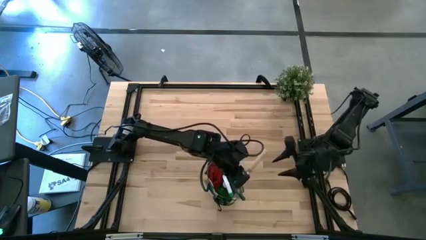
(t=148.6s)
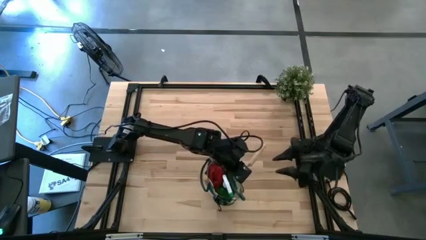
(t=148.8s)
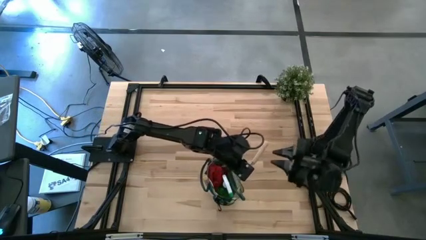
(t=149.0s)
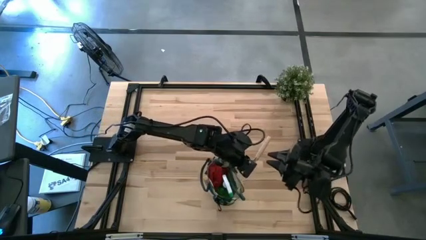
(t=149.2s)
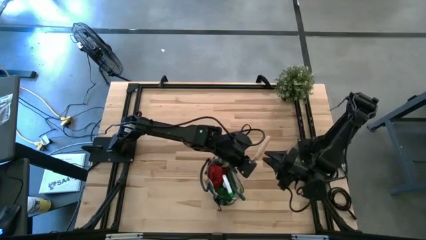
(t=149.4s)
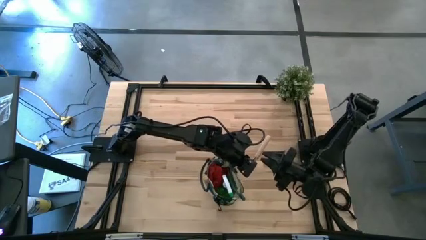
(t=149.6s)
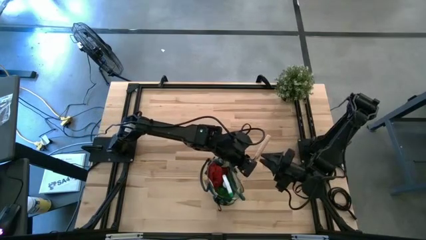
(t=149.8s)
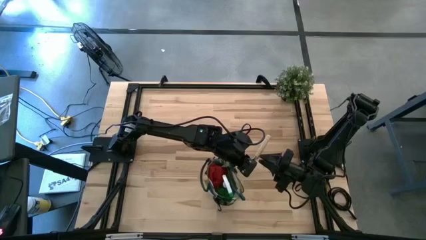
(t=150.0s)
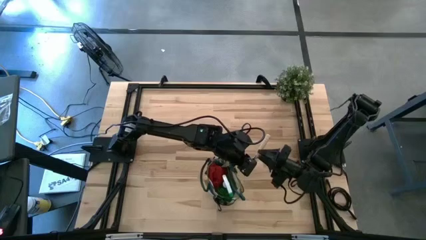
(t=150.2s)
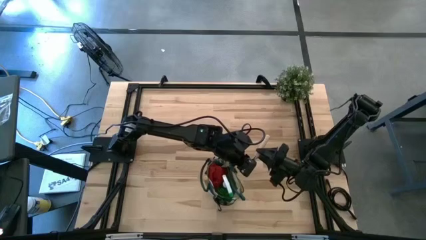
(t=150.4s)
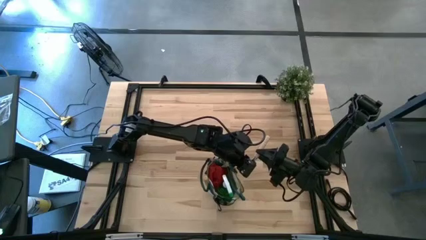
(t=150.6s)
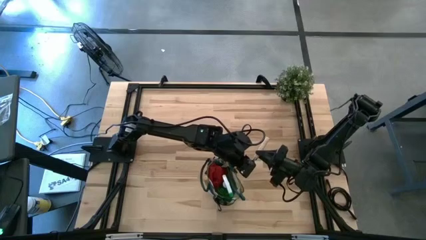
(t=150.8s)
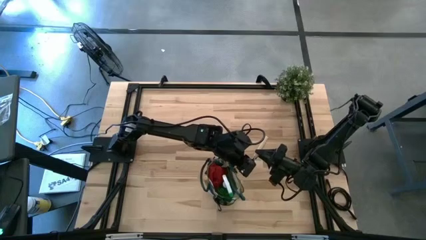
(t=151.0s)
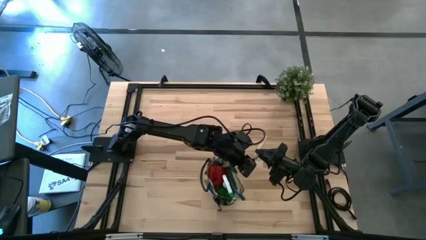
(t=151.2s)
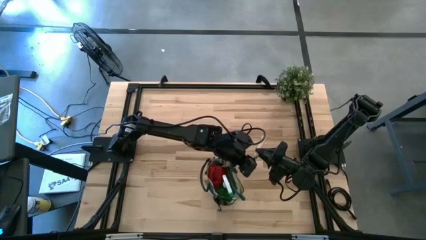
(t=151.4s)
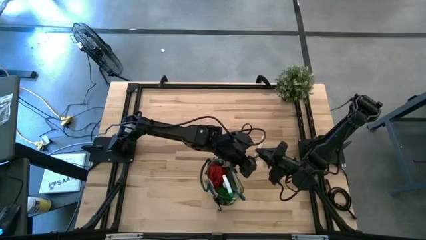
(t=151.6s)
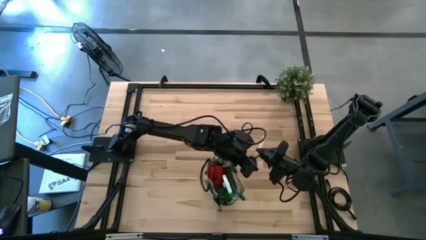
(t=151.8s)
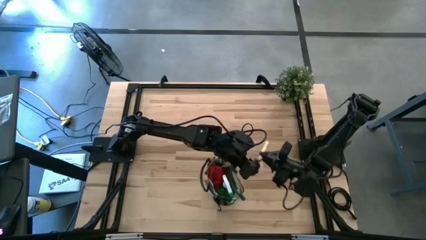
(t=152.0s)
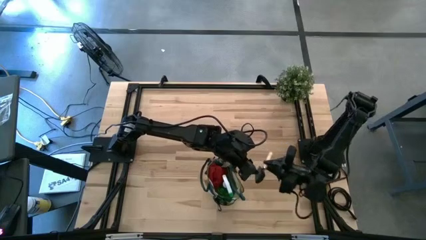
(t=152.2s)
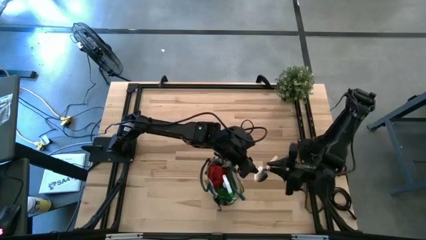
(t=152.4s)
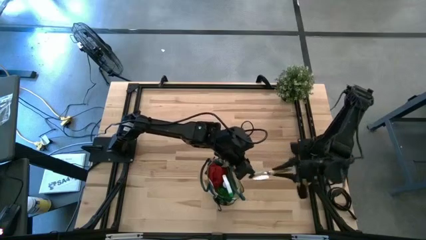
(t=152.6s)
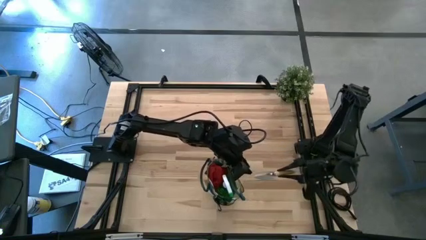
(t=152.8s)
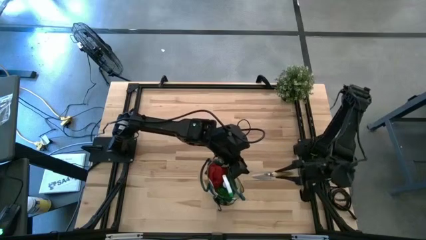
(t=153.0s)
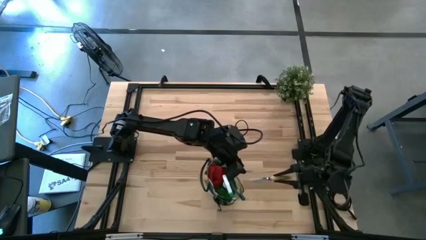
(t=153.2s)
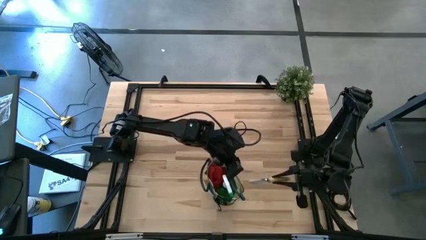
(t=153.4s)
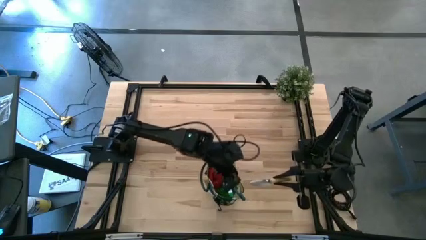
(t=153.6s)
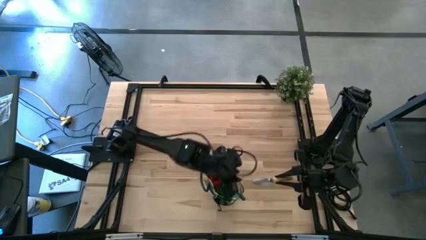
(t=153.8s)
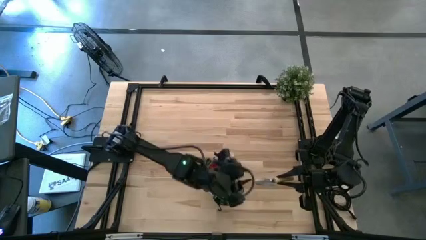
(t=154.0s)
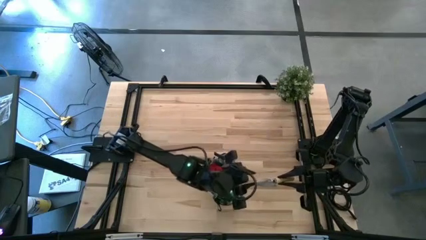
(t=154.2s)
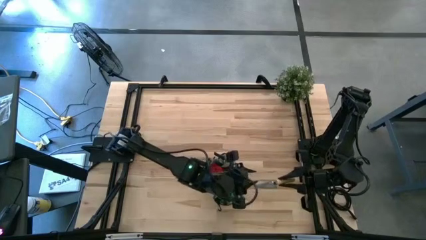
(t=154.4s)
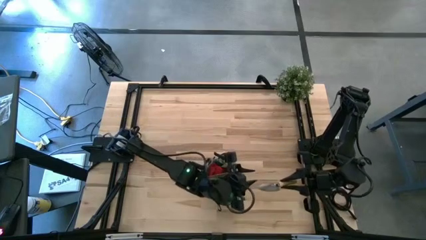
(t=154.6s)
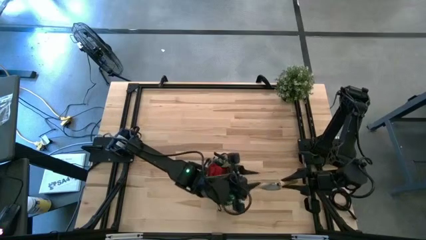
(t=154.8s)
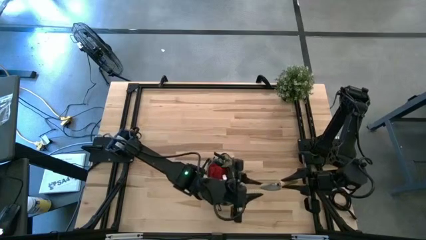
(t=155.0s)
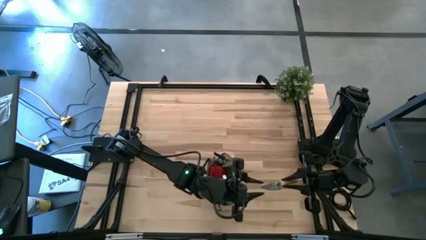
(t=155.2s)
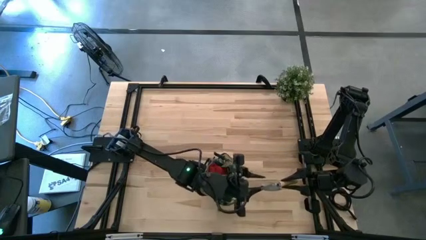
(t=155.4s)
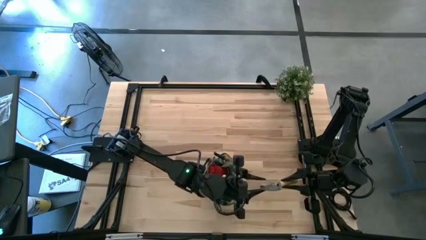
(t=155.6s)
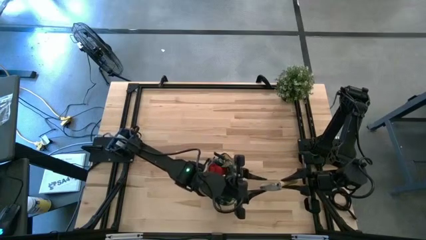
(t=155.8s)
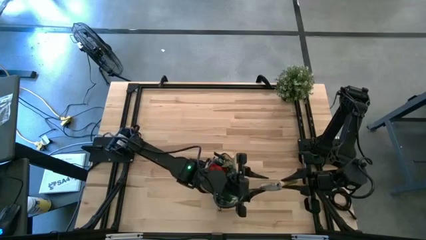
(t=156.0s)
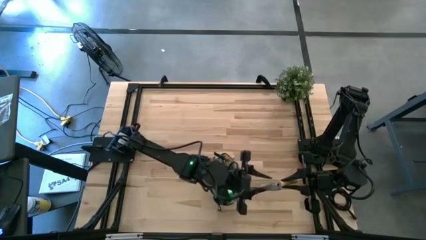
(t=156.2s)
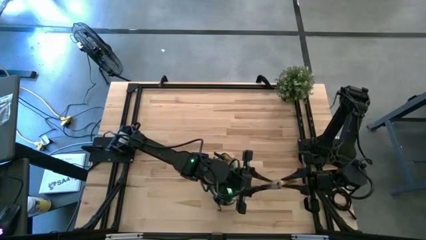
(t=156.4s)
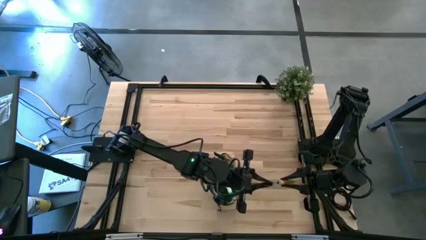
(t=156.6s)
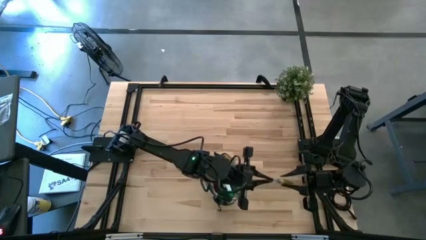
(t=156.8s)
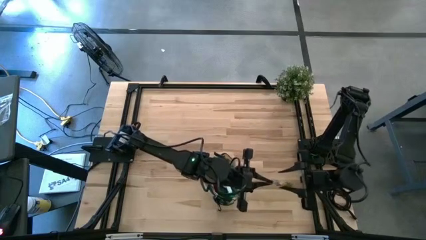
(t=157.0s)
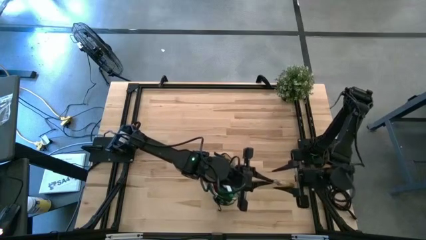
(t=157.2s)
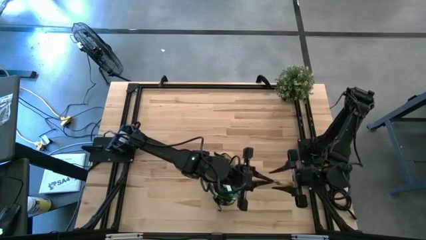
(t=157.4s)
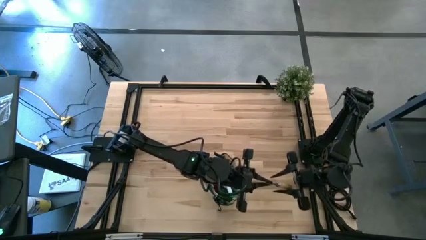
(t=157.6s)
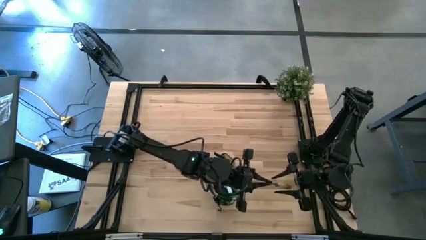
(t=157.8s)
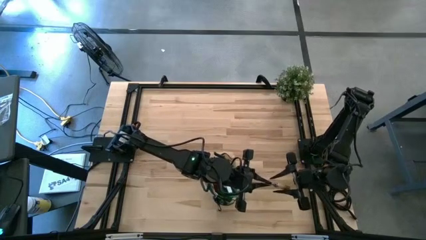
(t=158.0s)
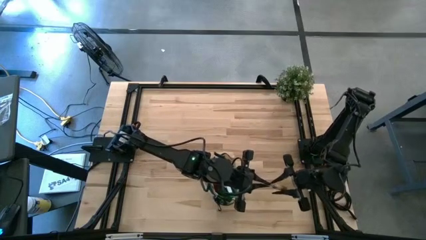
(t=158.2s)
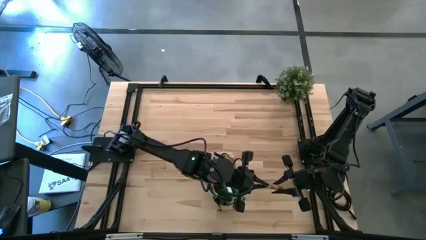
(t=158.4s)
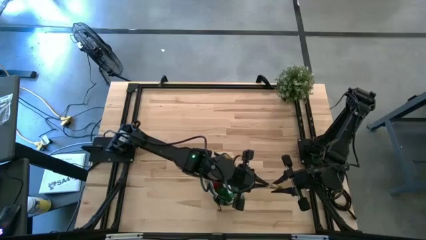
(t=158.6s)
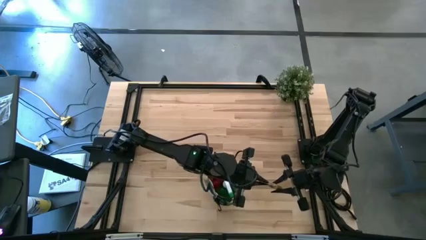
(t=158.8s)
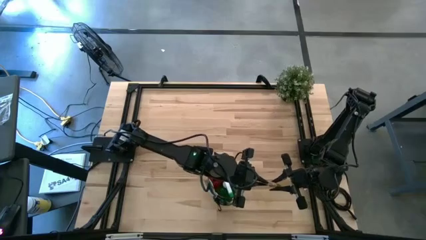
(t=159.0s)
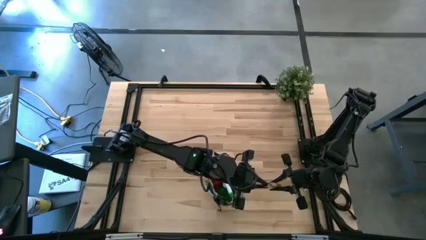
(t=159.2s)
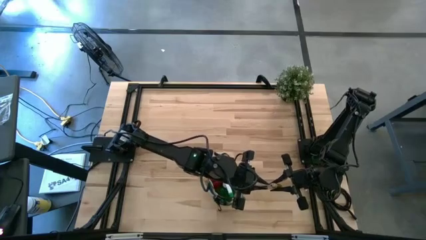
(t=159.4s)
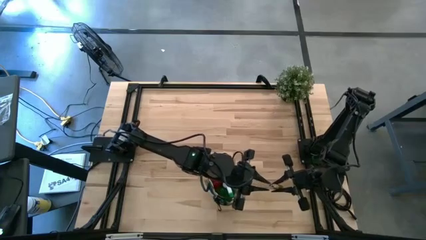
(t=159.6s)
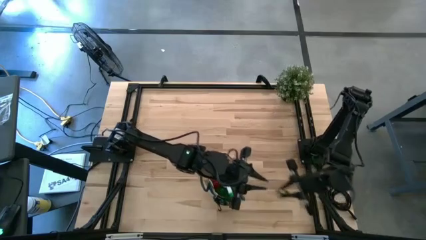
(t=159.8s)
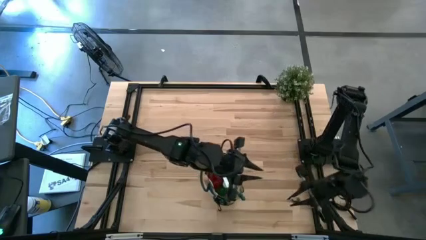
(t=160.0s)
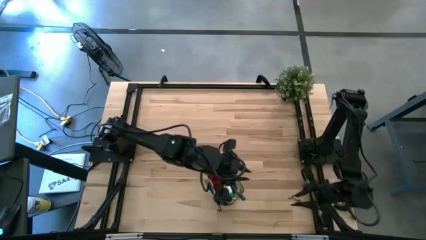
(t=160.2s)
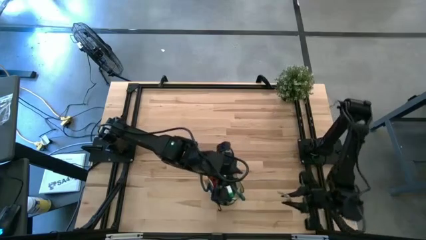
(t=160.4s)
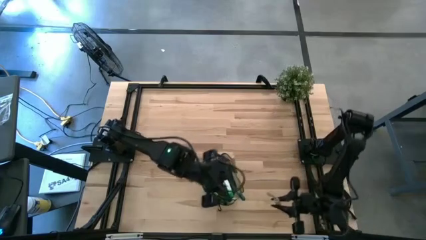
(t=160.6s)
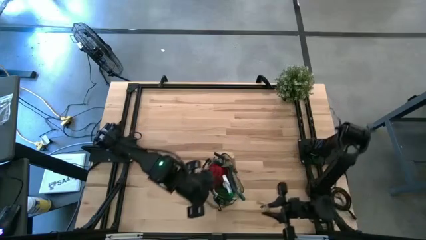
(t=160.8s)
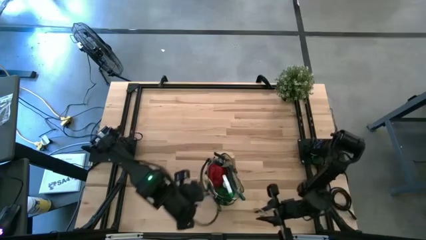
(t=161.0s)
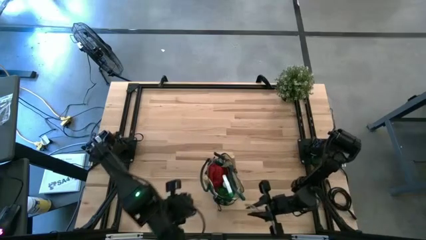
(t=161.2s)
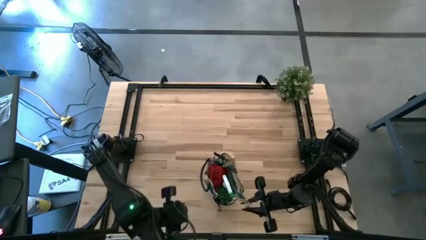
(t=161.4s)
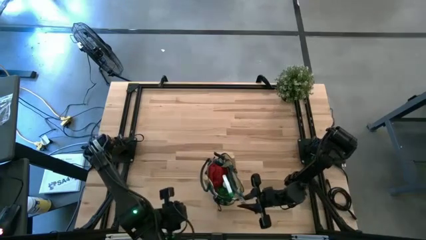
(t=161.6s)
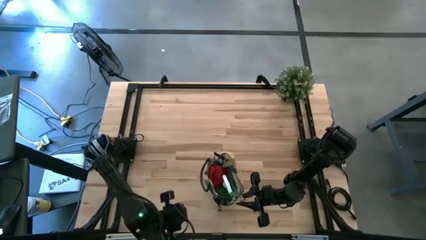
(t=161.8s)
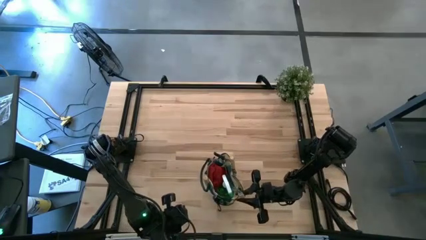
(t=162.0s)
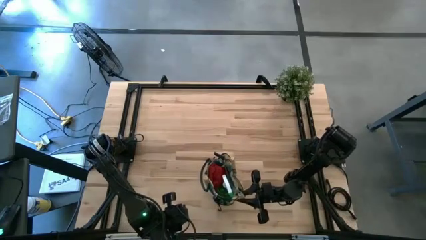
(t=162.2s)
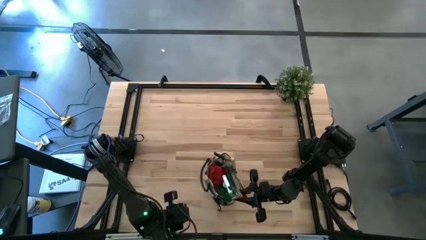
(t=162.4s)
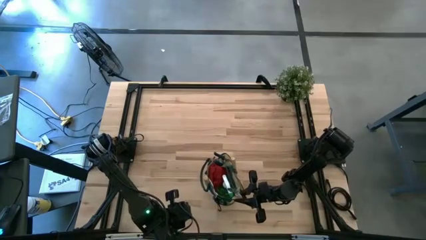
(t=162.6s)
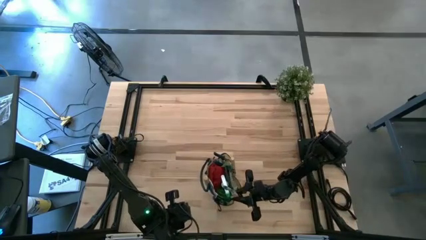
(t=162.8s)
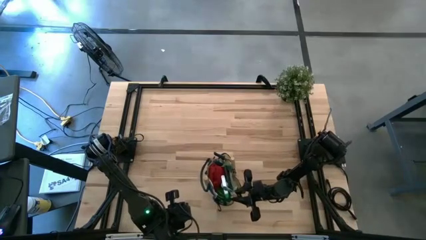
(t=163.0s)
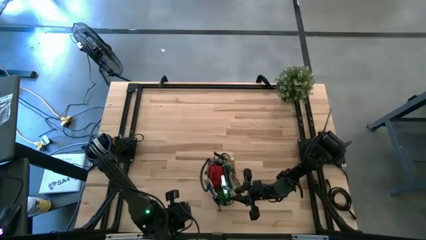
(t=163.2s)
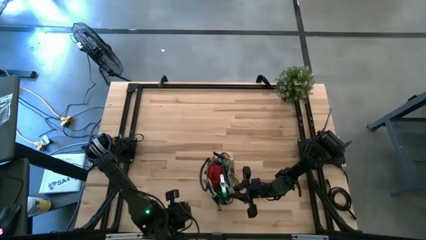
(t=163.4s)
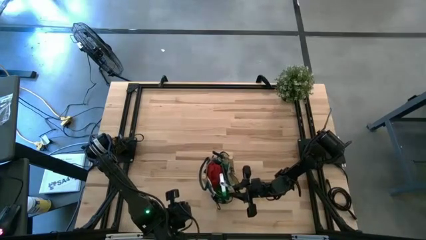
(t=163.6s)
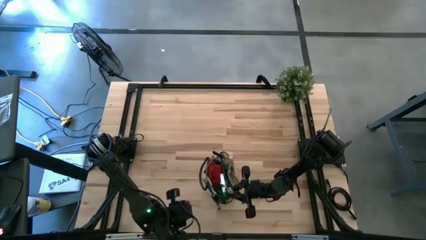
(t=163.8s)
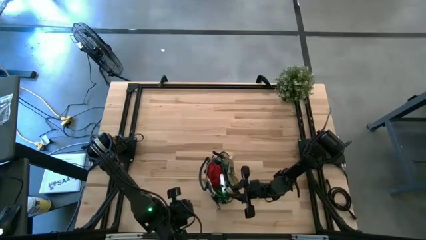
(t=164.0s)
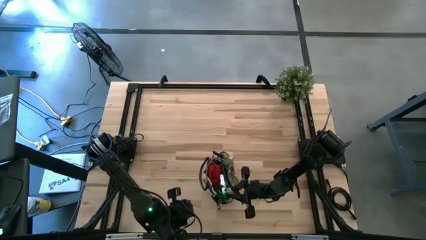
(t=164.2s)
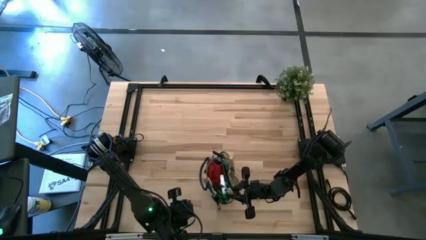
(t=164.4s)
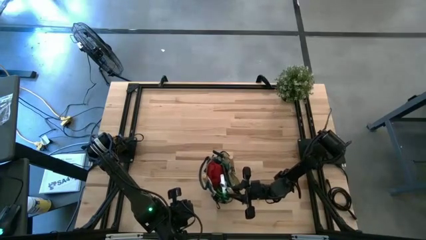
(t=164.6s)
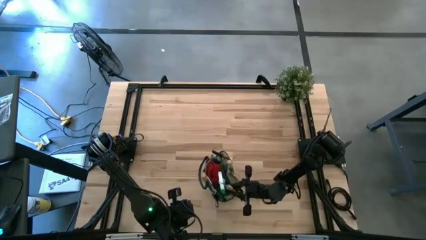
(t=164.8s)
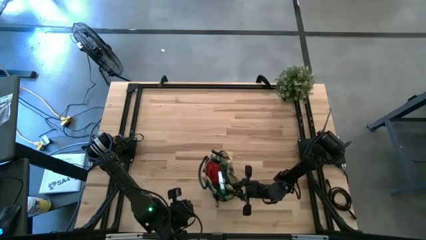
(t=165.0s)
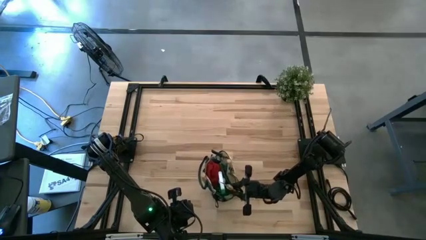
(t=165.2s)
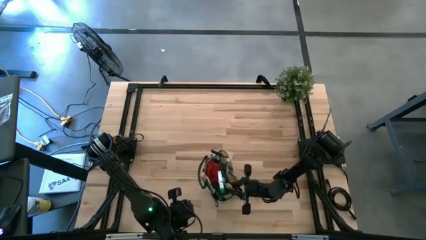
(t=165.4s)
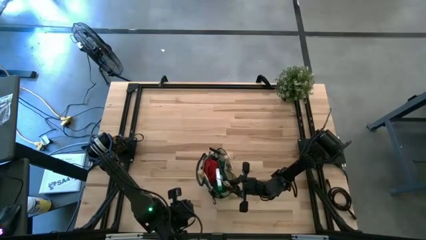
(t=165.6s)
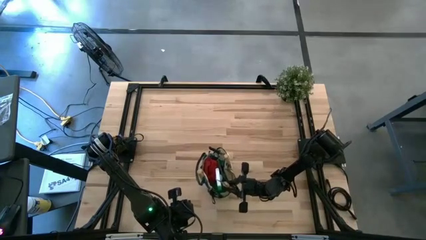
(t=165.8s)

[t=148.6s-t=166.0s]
Task: Pick & Place Garden tools in Gardening bag
Put the trowel into the gardening bag
